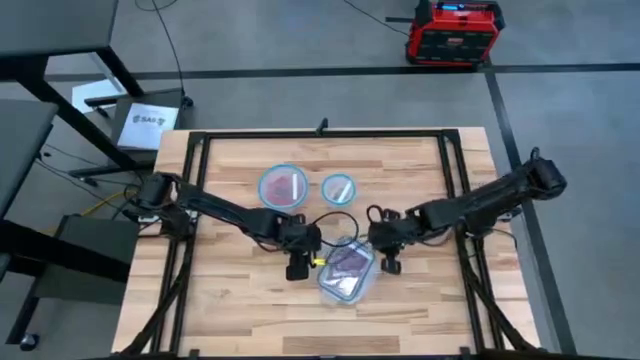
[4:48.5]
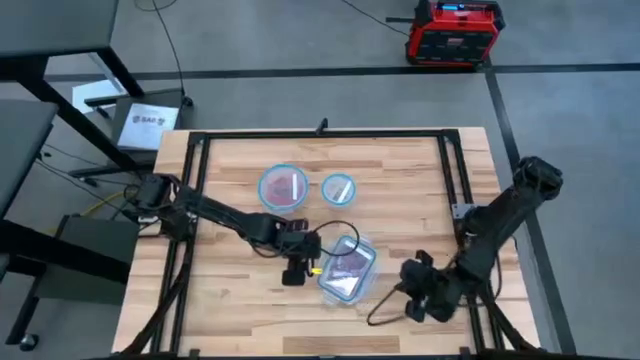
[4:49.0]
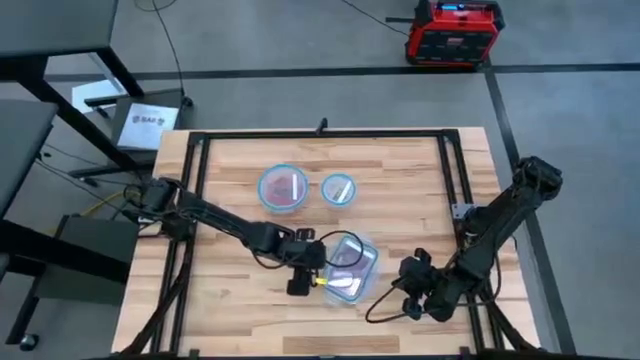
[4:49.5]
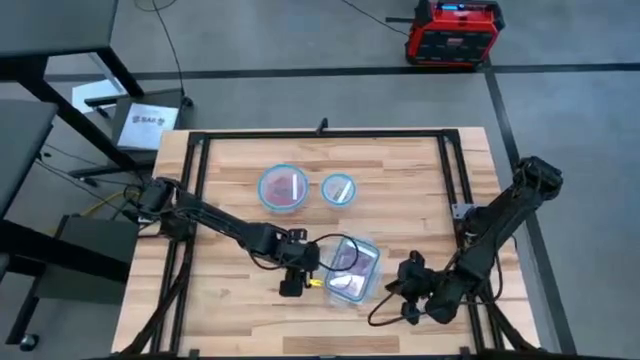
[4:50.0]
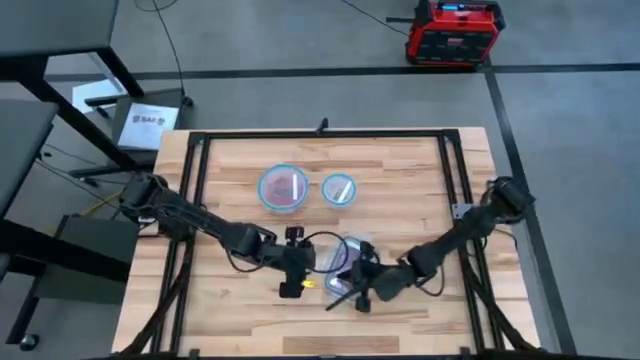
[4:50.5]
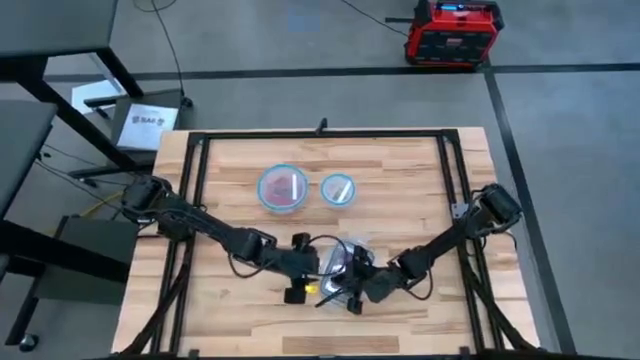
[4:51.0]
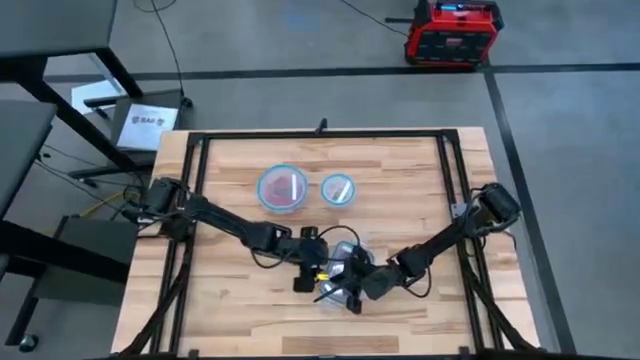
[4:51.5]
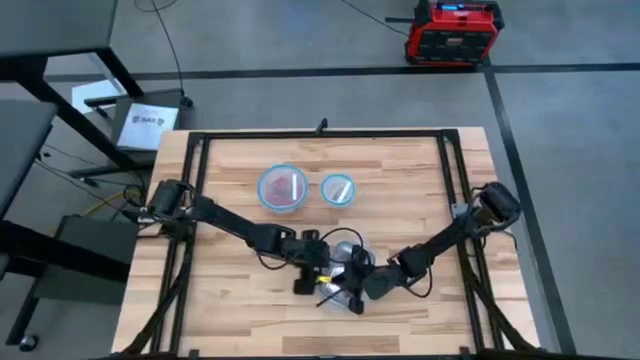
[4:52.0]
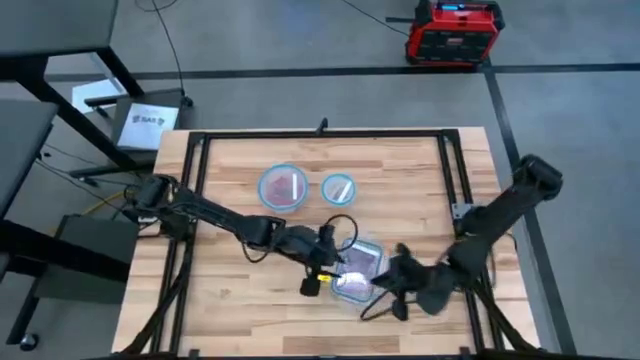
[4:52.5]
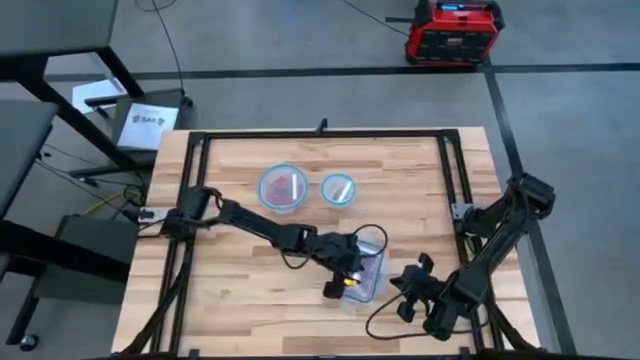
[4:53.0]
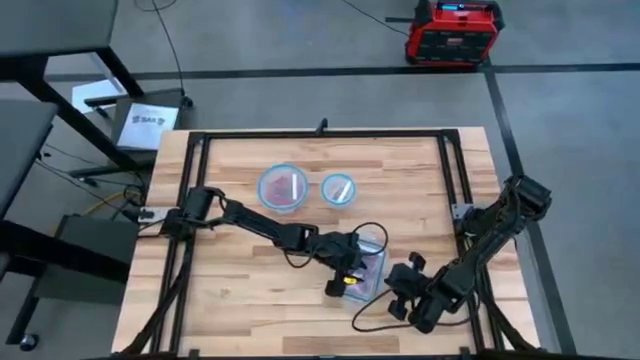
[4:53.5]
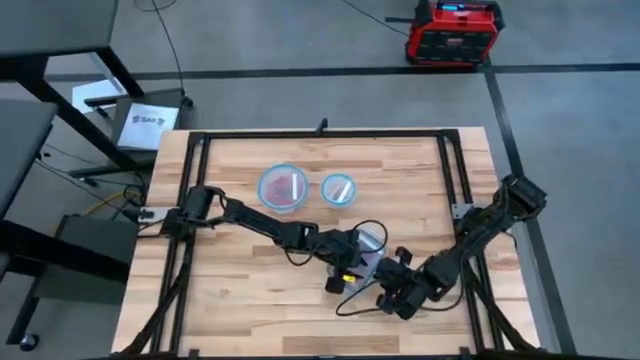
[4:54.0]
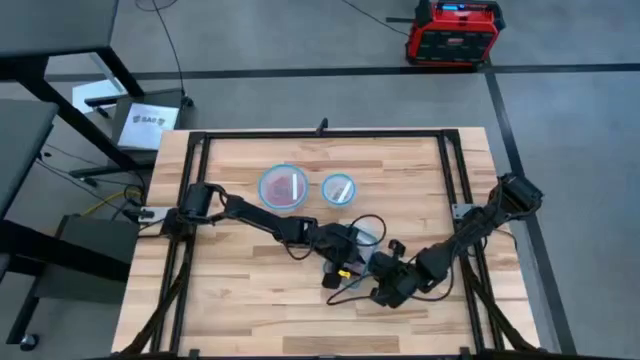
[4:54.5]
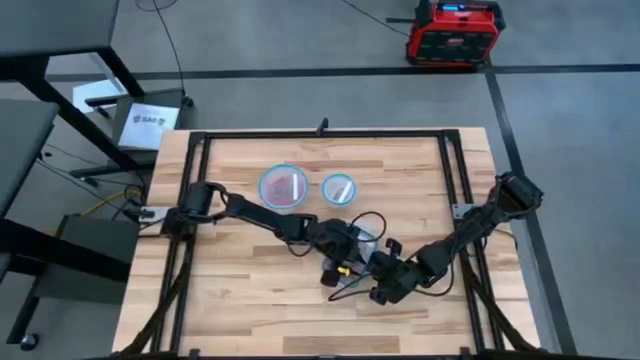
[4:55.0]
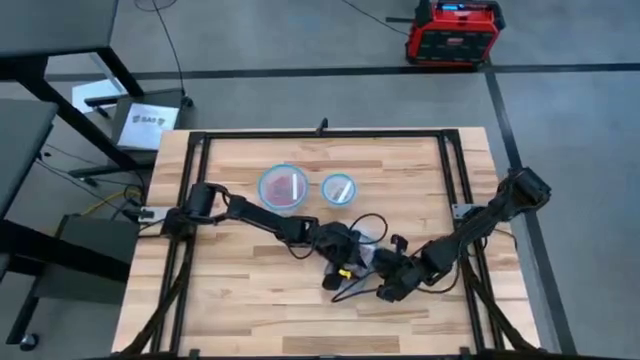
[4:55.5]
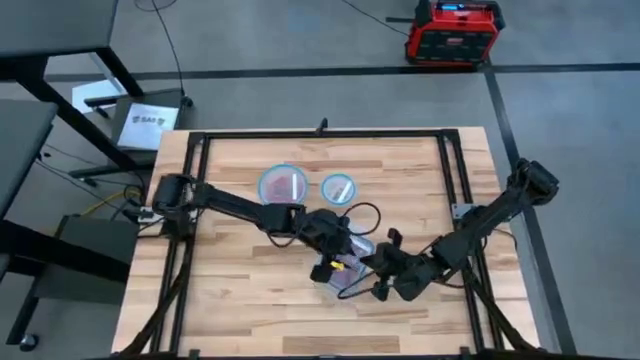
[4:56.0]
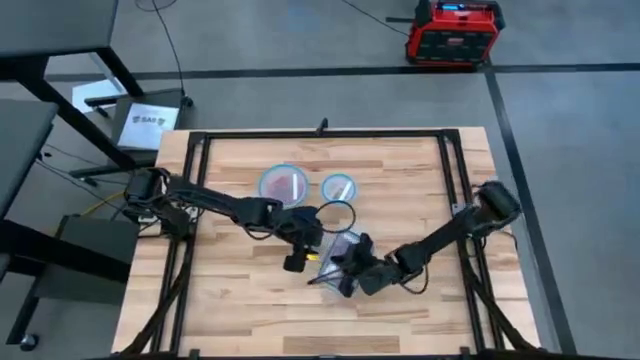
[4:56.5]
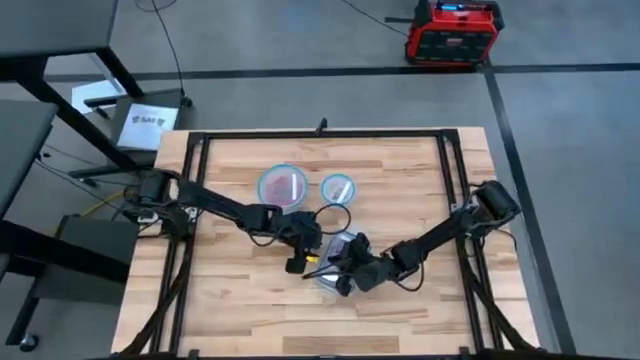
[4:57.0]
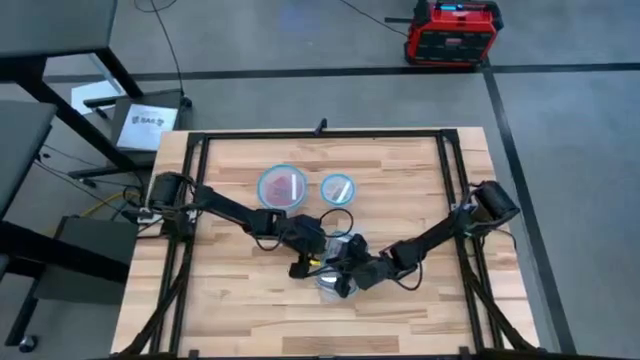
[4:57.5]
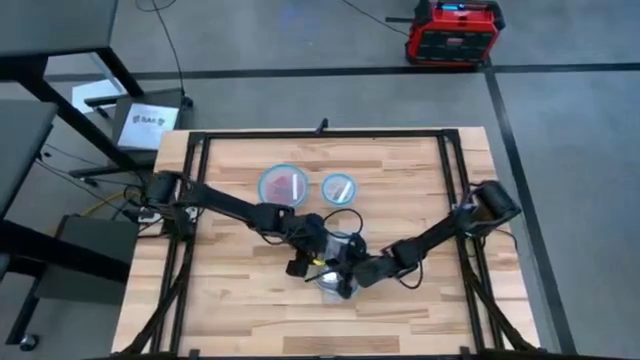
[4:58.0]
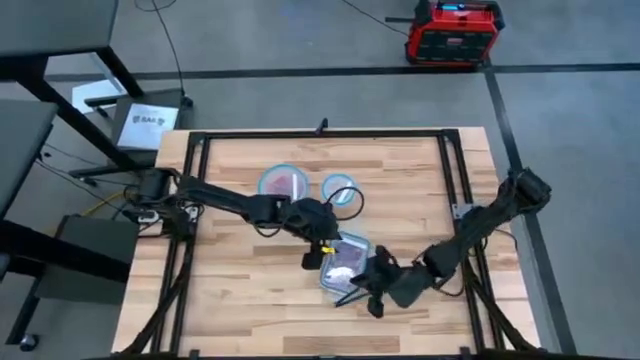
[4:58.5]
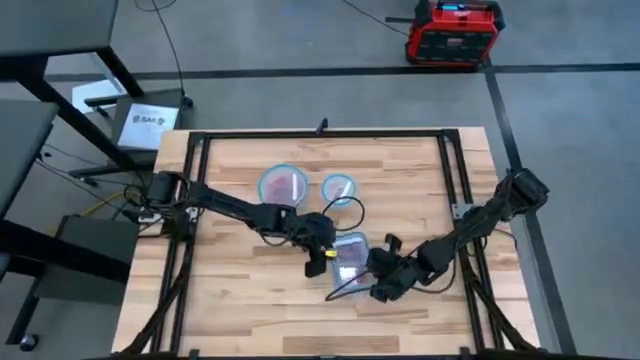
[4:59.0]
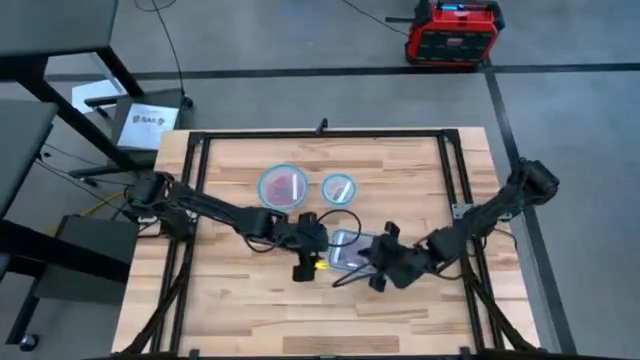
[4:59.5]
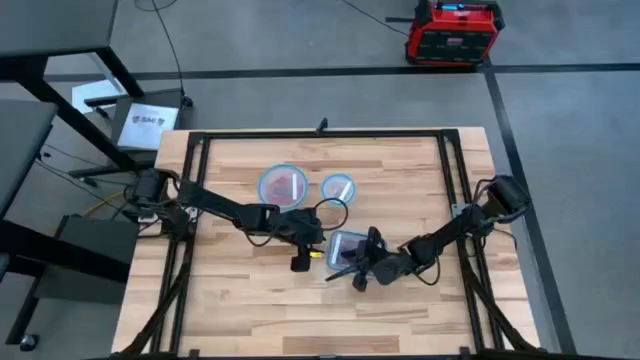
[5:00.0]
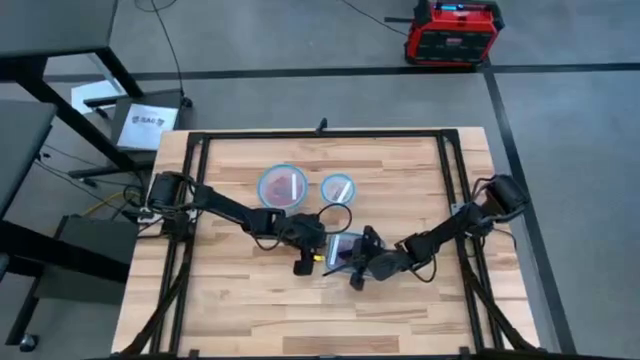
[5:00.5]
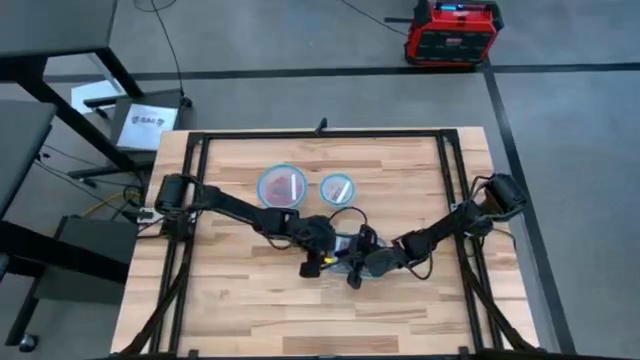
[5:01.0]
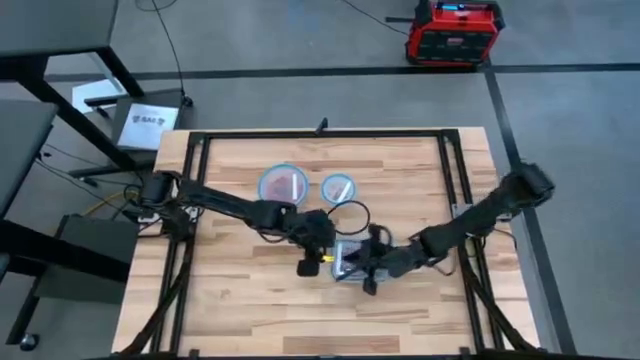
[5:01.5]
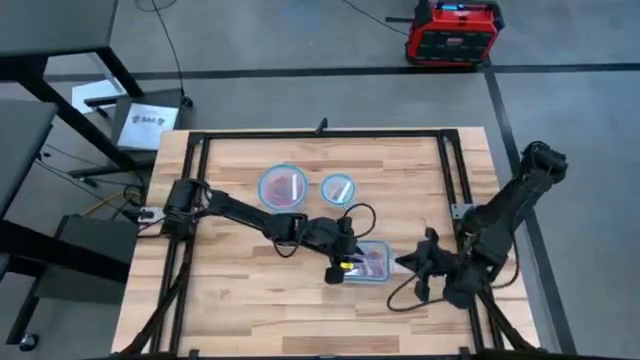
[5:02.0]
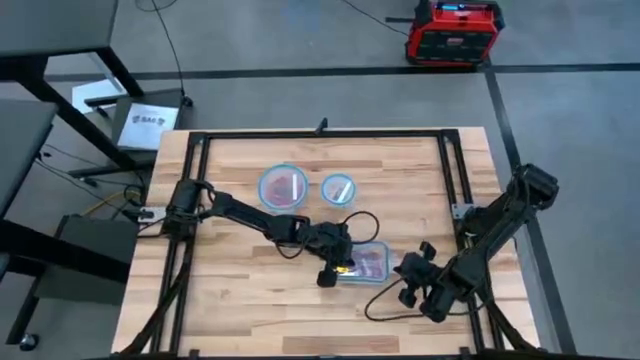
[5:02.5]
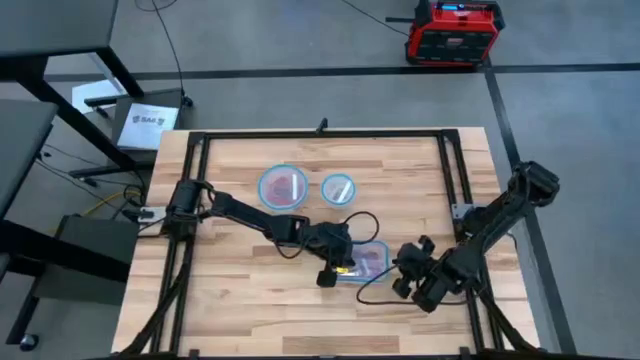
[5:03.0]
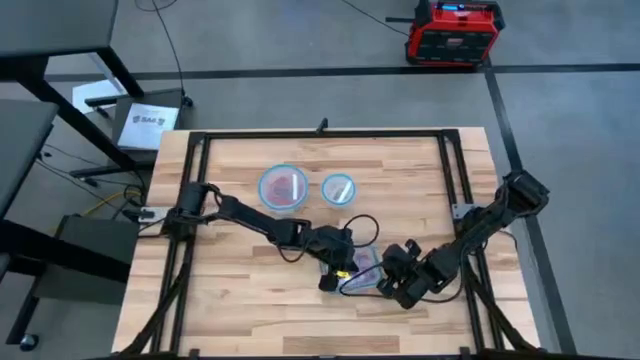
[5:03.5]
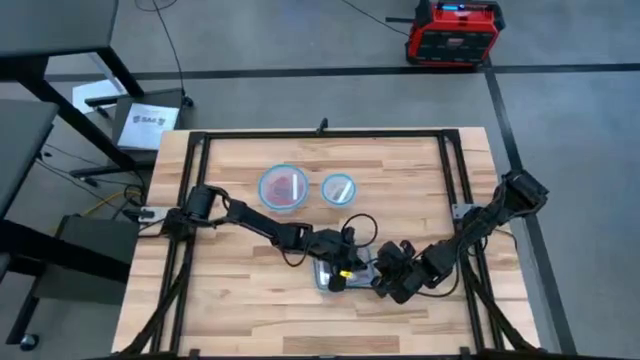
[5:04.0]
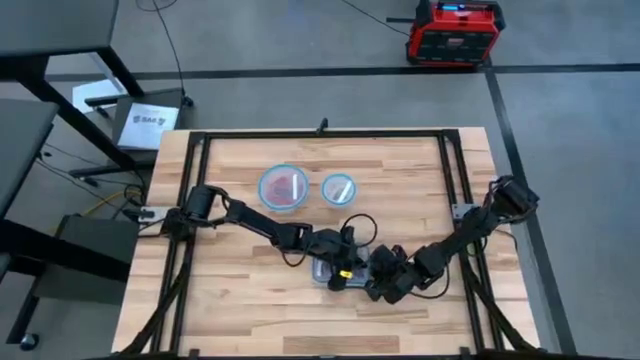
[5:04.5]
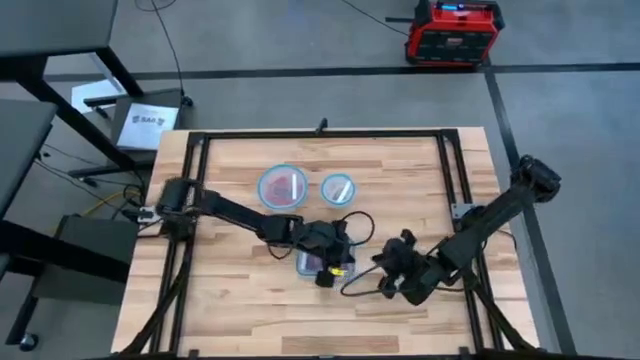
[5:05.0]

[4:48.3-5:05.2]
Task: Sort candy
Close the center transparent bin with the lid

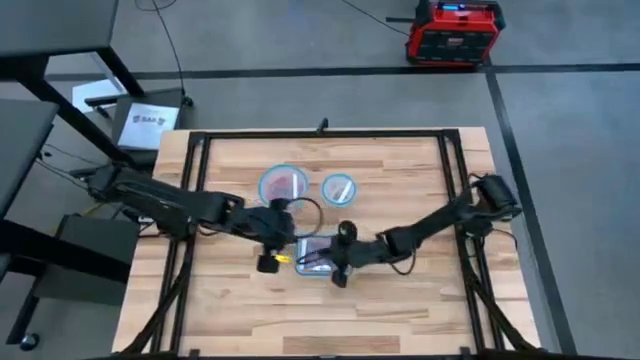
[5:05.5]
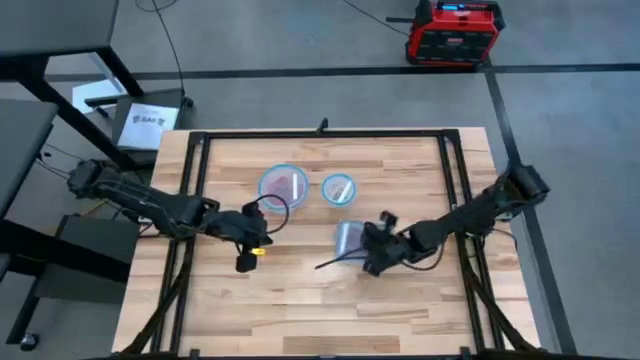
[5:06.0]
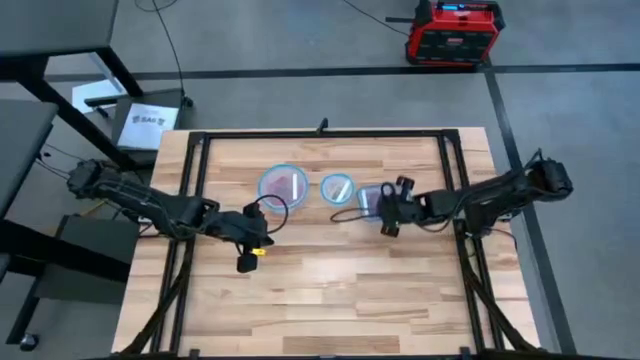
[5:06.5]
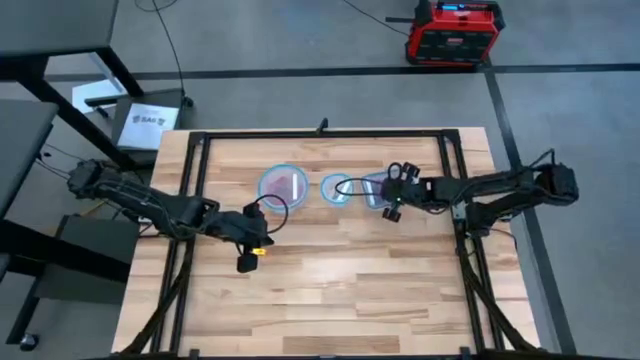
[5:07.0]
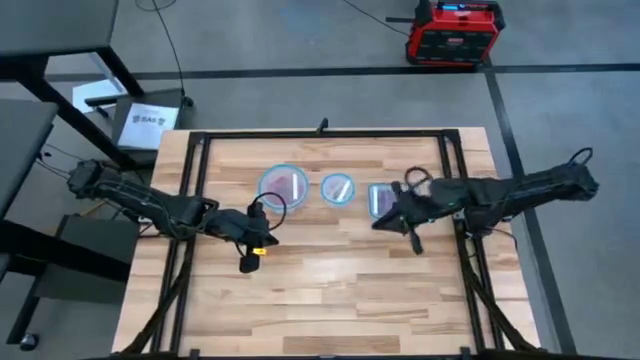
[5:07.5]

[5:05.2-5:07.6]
Move the center transparent bin to the top right

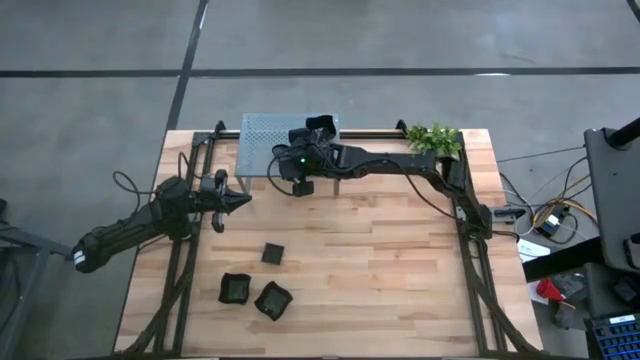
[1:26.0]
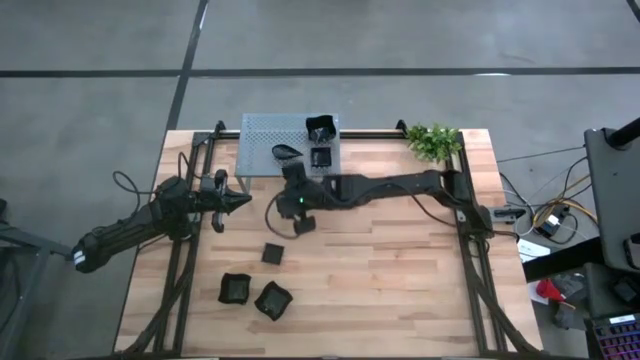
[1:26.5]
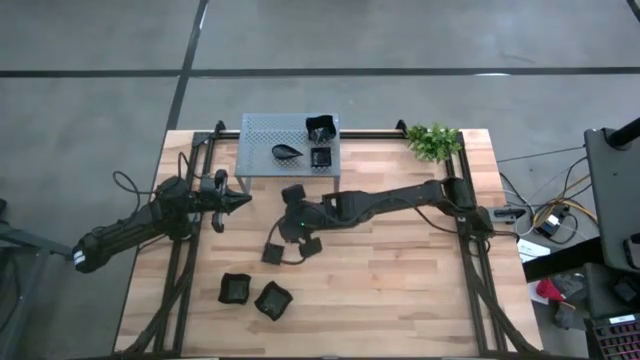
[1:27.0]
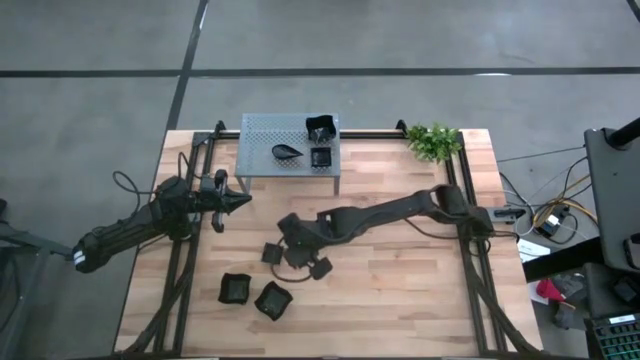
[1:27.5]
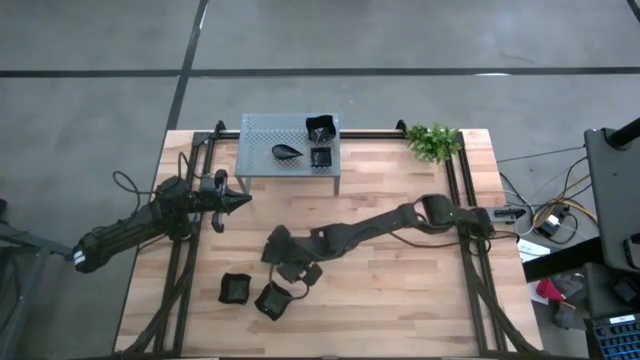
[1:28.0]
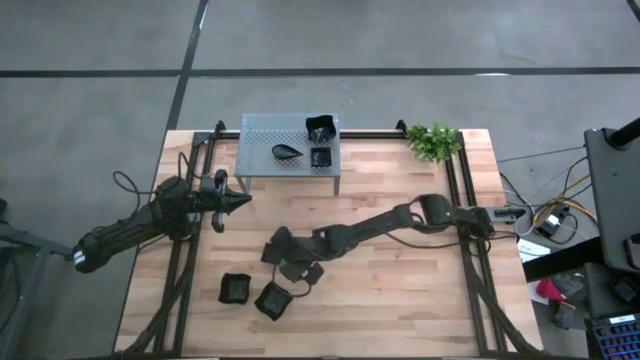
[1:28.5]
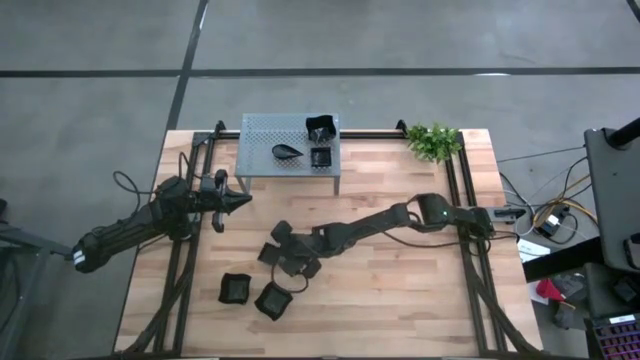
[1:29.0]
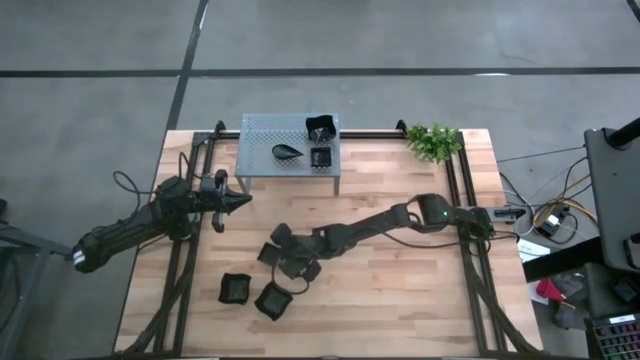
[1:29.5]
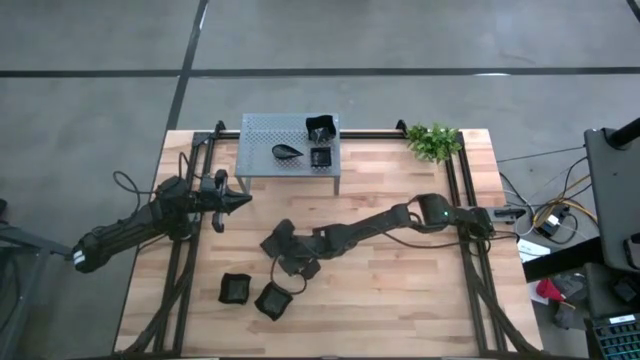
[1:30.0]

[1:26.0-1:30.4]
Task: Pick & Place Mini shaped plates
Stack the black square plate on top of the other black square plate on the shelf
